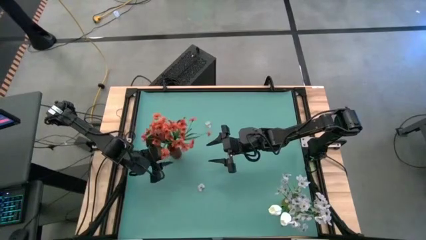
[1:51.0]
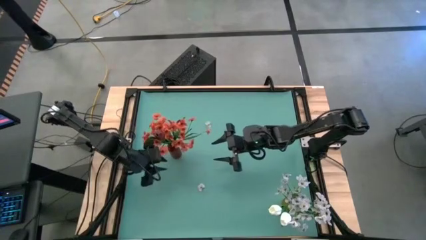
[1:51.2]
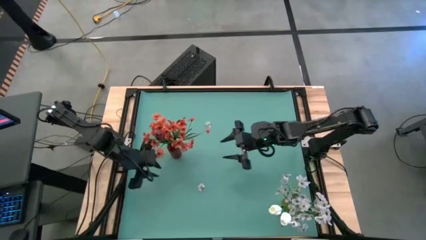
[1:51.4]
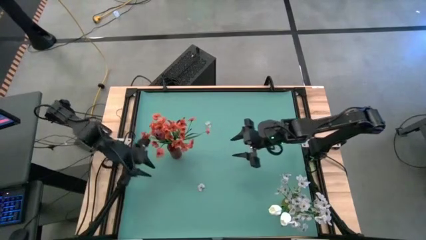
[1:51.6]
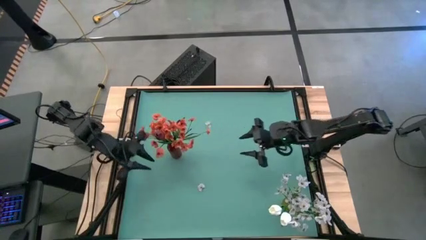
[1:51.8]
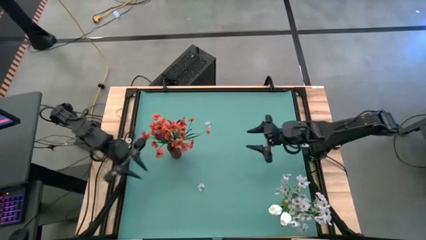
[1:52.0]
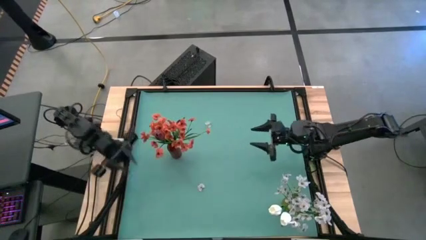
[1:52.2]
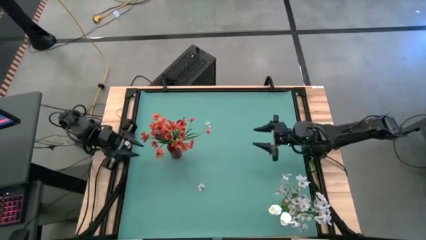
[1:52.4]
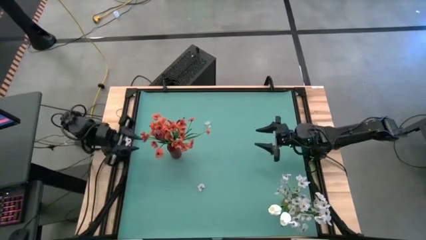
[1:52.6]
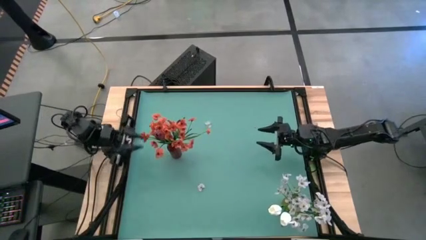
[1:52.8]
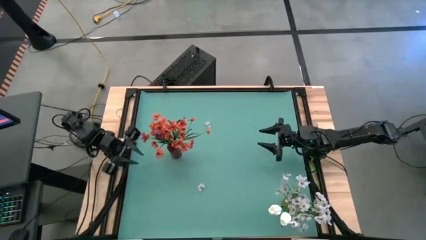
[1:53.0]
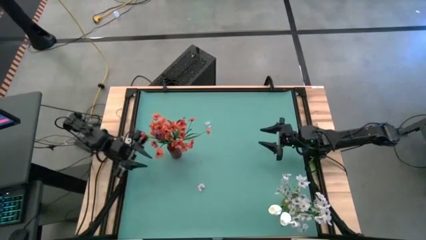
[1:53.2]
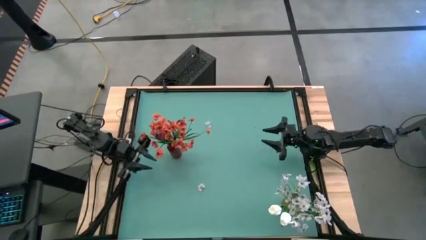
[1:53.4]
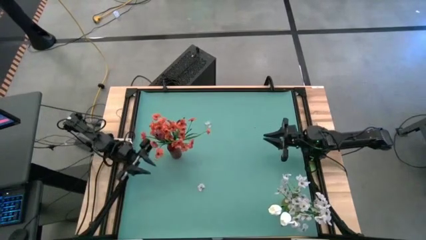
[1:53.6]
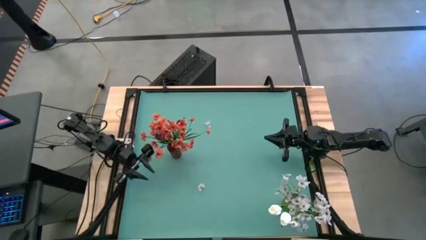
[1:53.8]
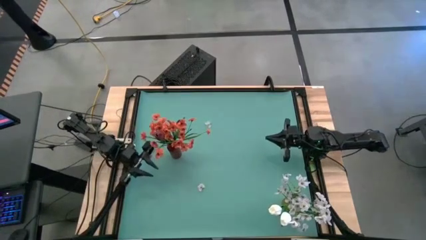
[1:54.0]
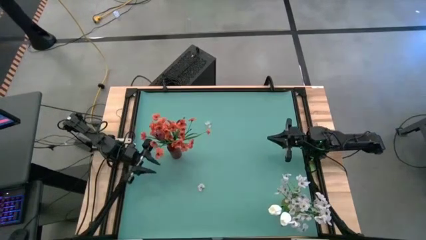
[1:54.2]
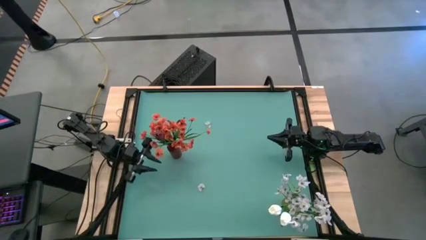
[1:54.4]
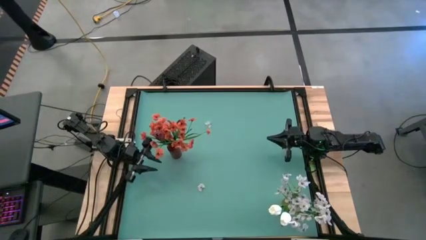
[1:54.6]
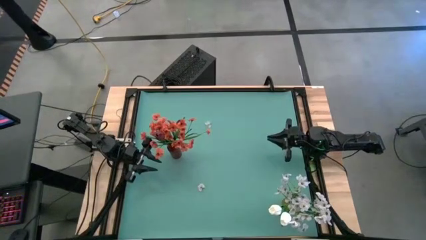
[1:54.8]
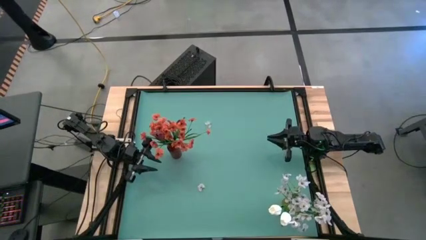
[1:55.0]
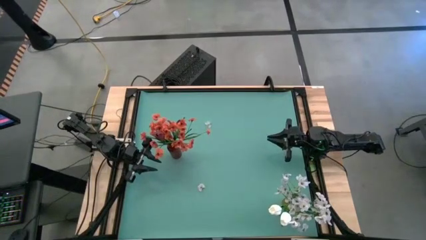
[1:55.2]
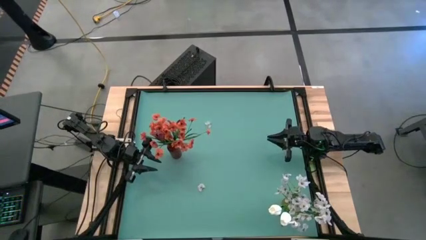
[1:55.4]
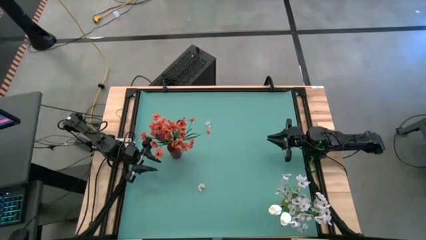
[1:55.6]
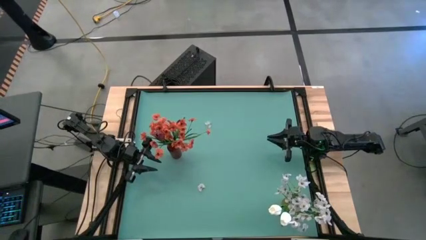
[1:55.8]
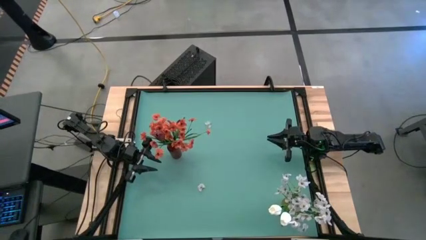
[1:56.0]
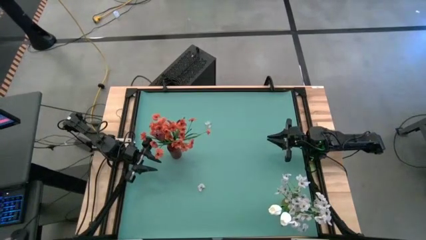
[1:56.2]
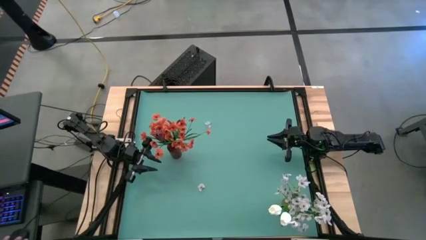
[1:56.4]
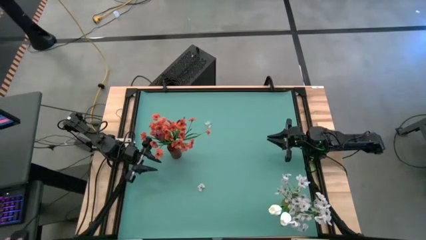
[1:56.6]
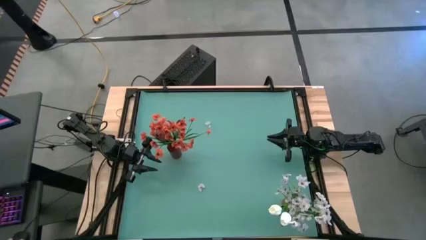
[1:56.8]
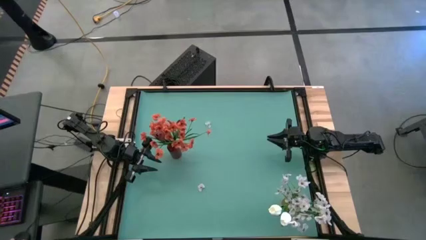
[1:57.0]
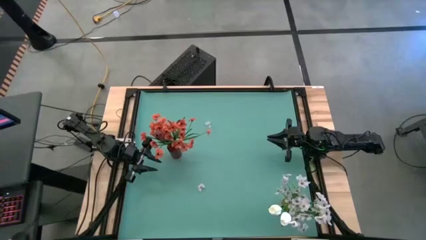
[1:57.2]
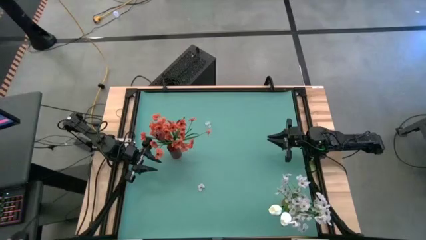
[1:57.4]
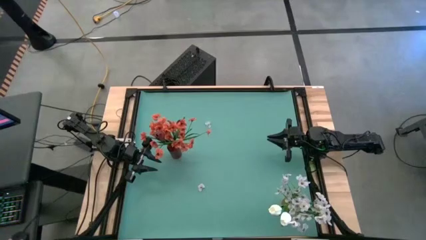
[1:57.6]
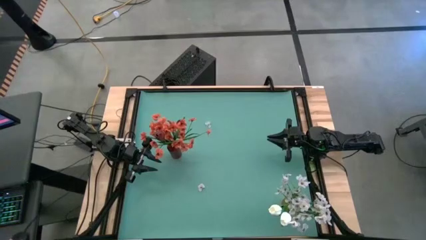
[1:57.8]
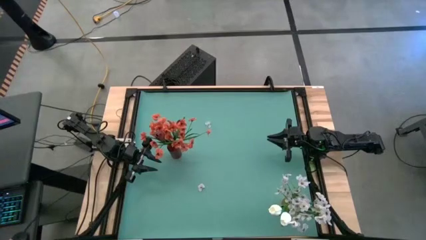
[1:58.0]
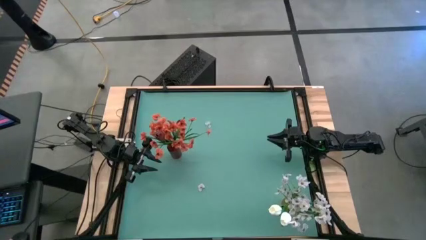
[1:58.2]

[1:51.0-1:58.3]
Task: Sort flowers into vase by color
Return to Home Position

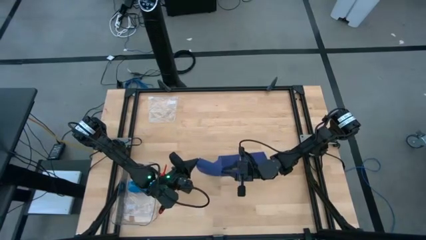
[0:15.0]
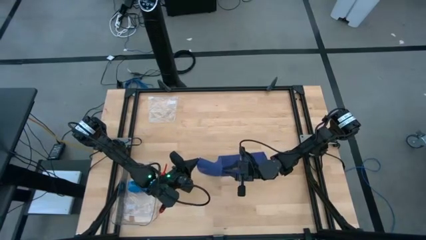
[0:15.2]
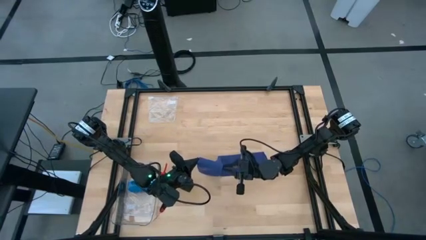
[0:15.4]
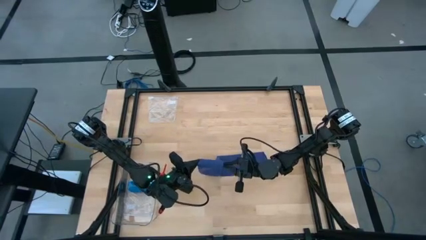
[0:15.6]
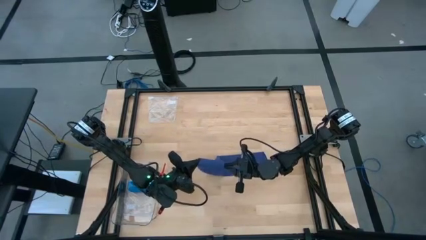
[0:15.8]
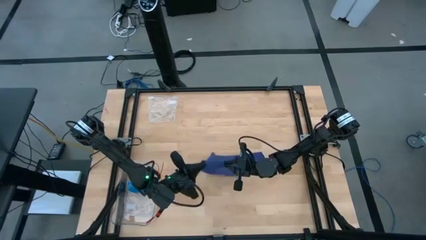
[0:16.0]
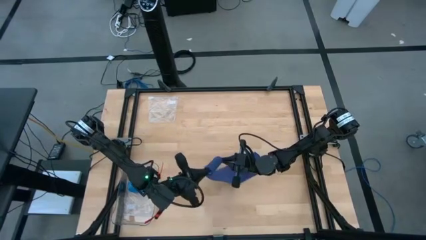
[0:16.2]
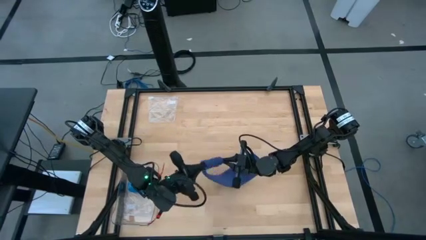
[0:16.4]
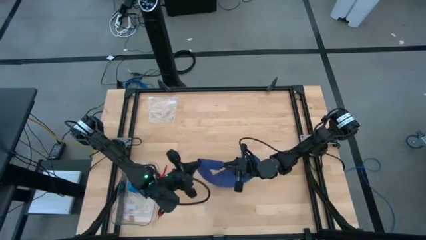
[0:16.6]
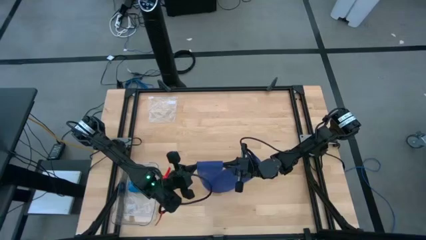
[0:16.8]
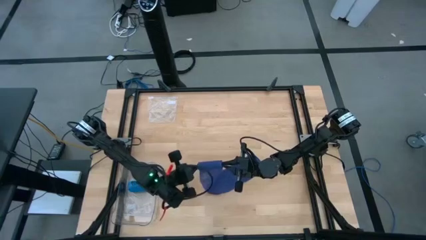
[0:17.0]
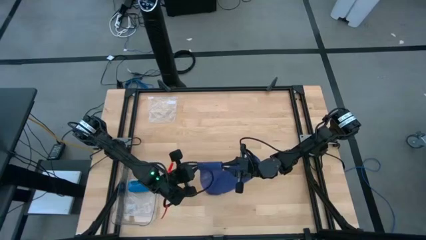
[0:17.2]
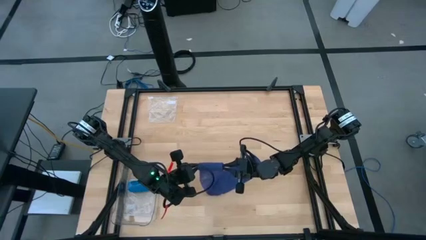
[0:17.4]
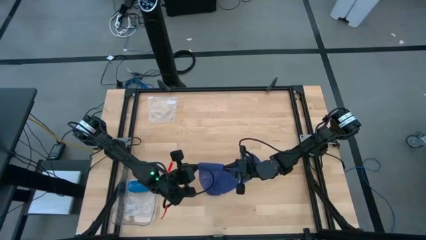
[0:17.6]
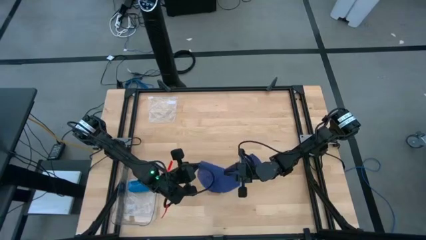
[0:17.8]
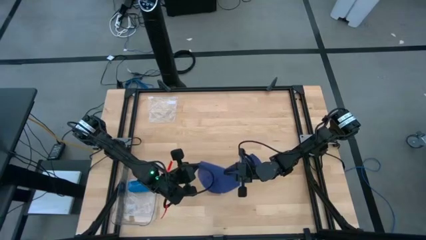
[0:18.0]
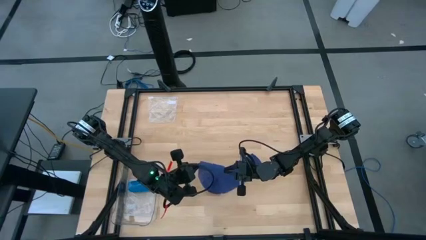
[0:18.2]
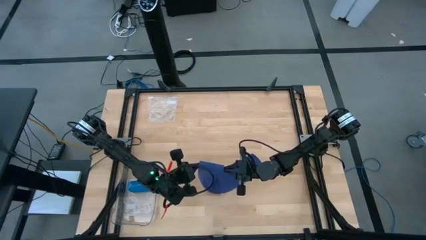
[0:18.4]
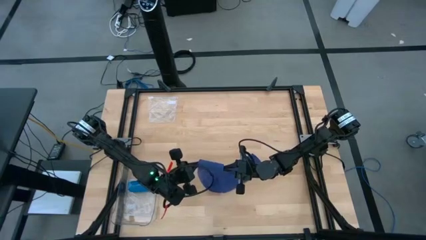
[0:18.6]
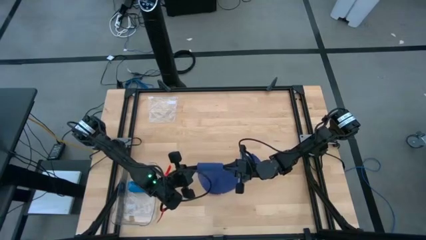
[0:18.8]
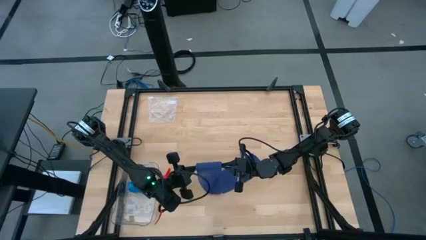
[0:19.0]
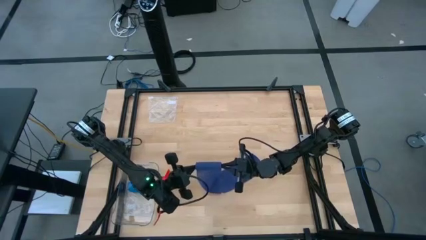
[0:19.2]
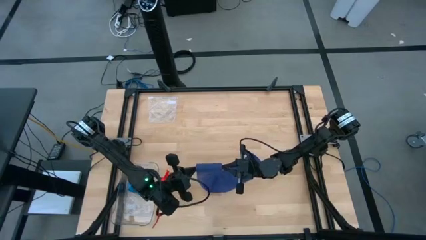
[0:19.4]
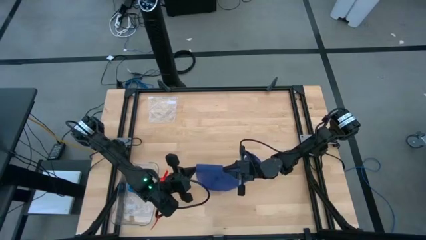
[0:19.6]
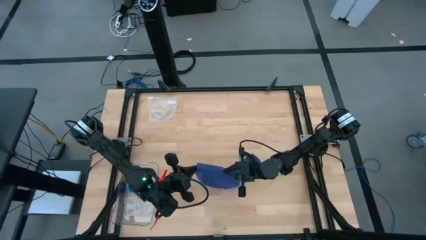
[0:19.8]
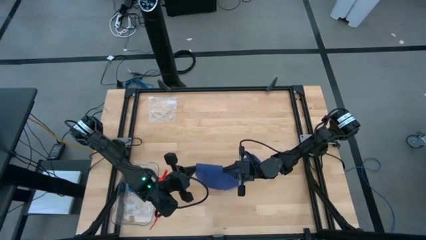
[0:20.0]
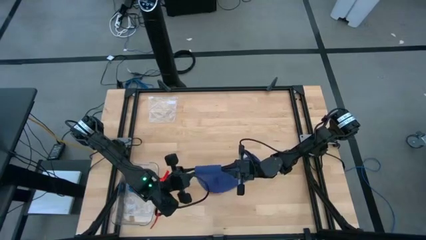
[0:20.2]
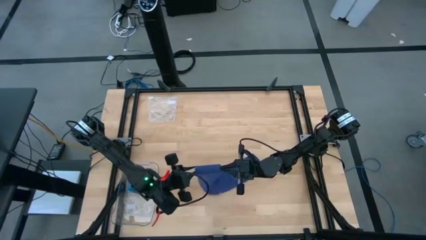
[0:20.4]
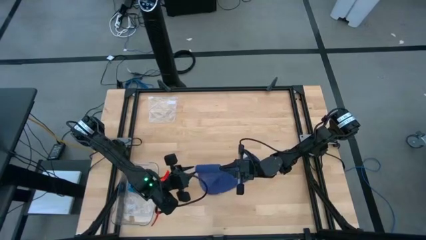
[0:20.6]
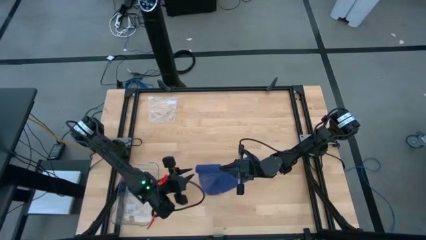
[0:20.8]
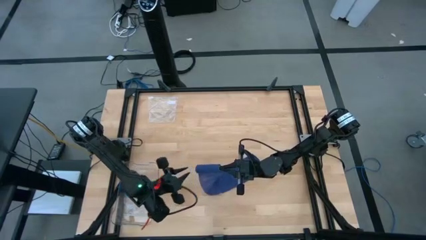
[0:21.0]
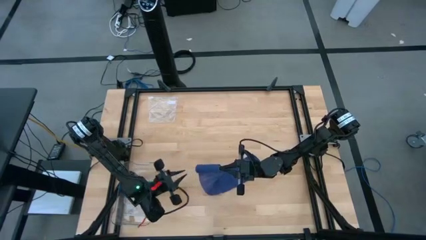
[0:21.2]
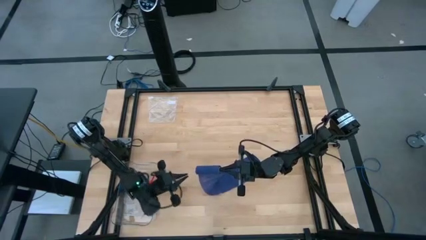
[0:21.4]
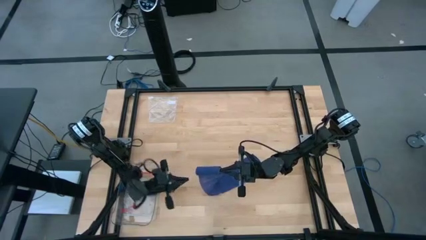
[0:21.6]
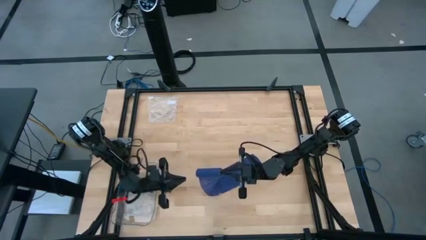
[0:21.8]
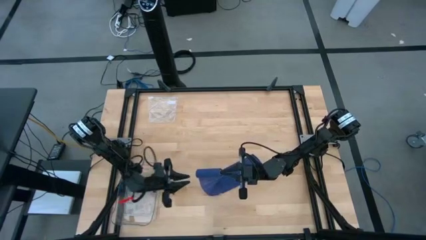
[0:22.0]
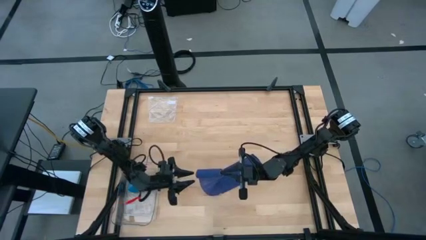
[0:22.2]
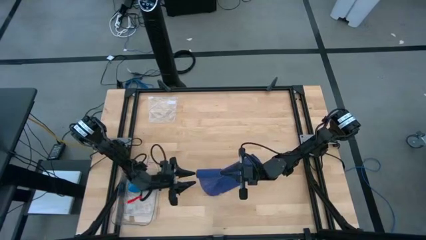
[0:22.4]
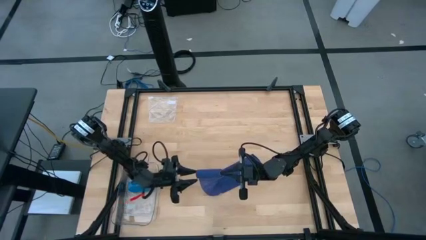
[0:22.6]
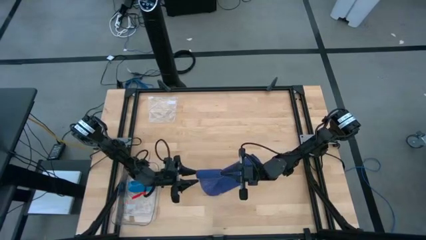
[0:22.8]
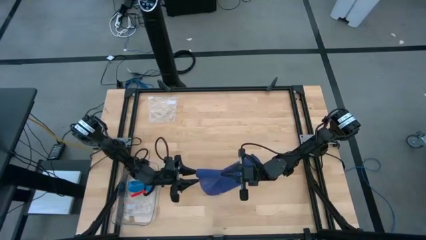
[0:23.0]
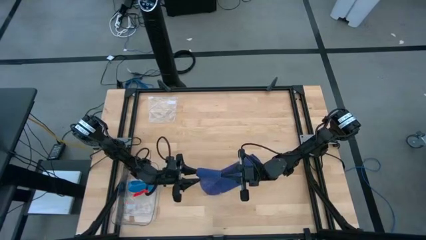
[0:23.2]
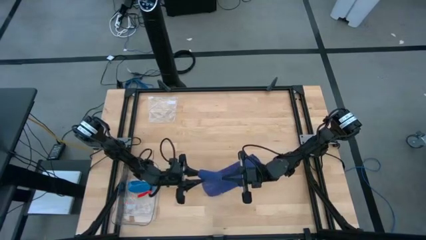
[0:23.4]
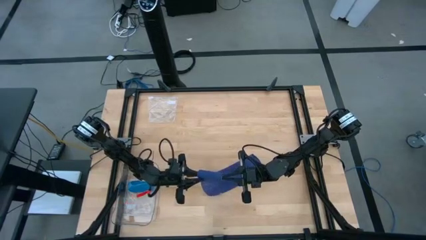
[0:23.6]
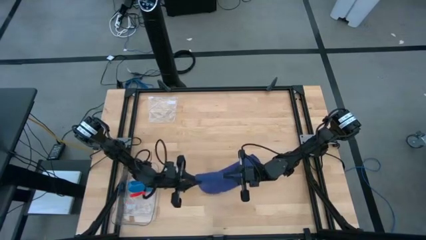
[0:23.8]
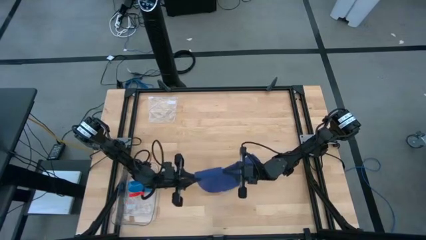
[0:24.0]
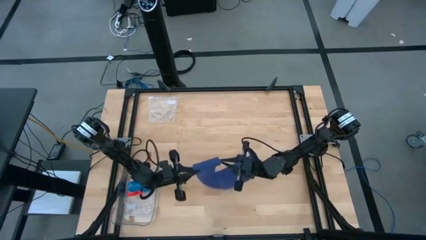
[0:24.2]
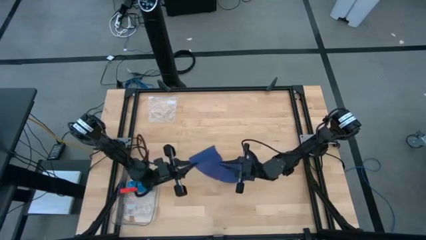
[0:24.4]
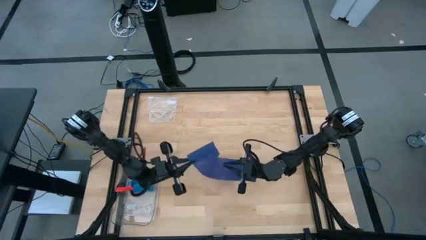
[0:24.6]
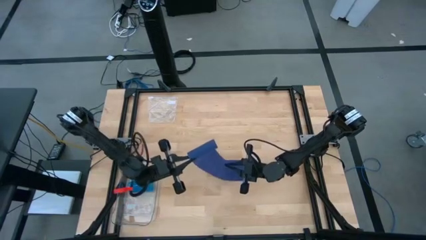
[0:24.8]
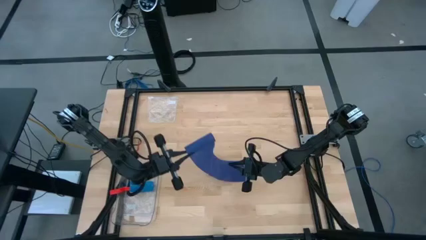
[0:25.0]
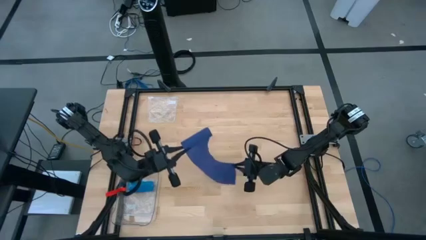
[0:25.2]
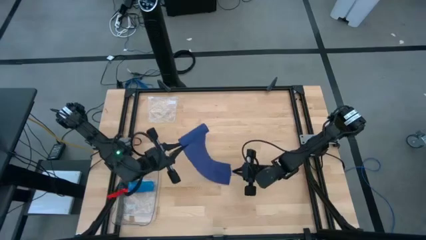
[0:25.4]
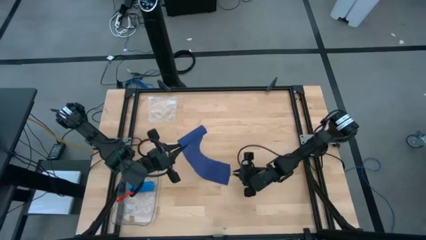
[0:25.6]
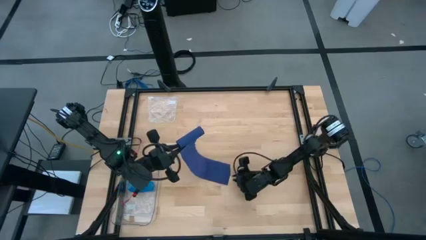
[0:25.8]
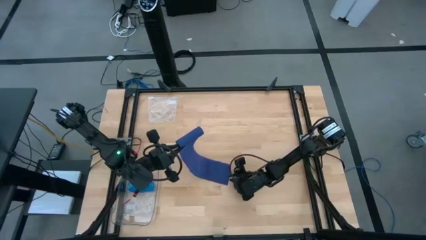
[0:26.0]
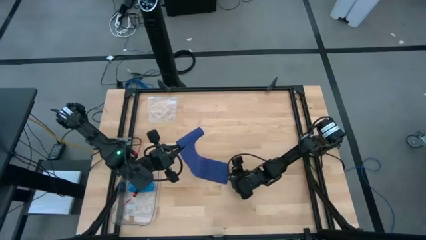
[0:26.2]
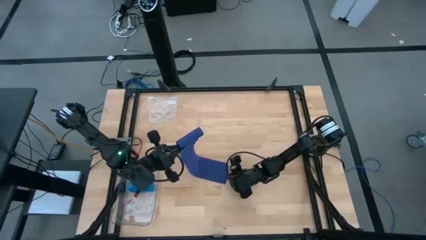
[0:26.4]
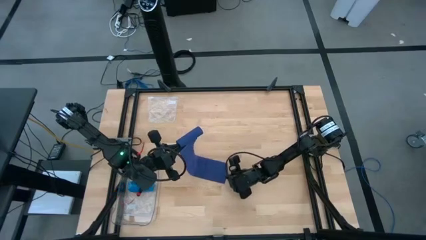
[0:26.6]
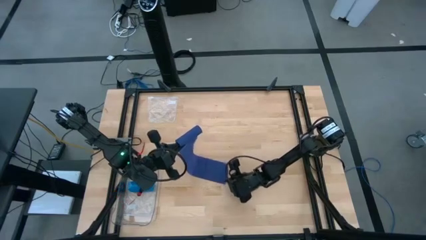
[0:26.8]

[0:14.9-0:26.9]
Task: Roll bandage
Roll the blue bandage
